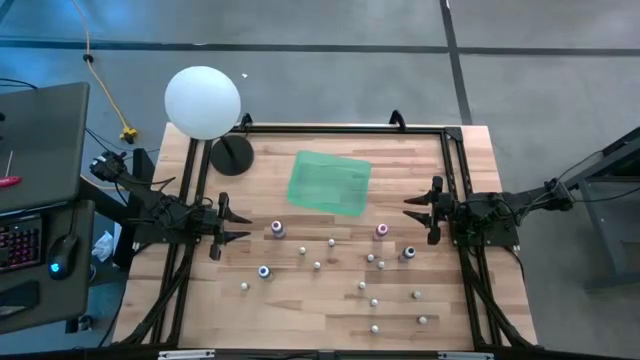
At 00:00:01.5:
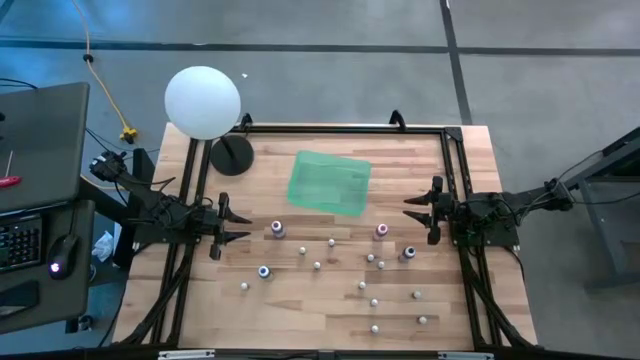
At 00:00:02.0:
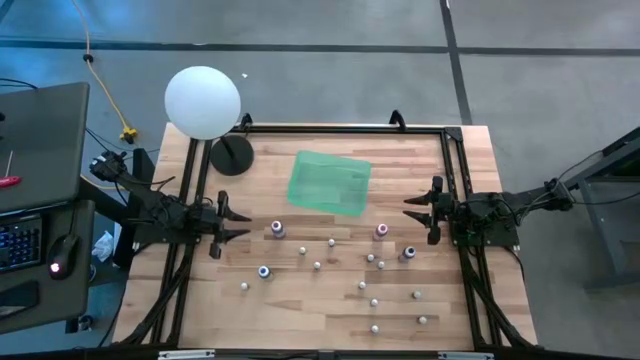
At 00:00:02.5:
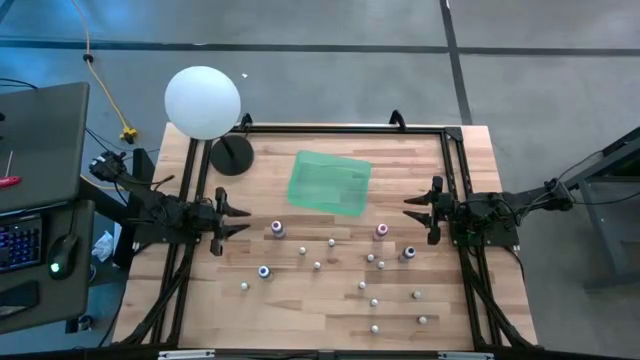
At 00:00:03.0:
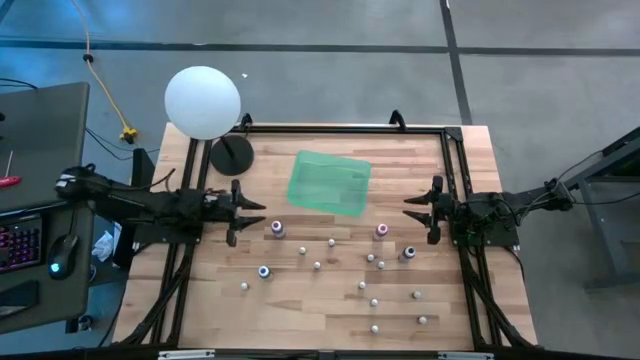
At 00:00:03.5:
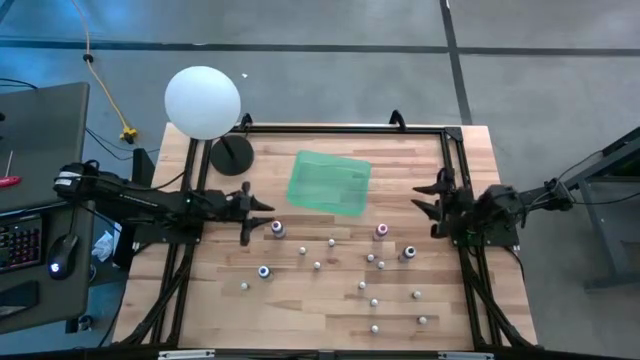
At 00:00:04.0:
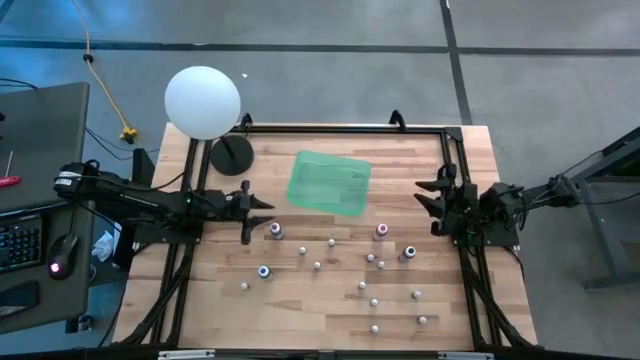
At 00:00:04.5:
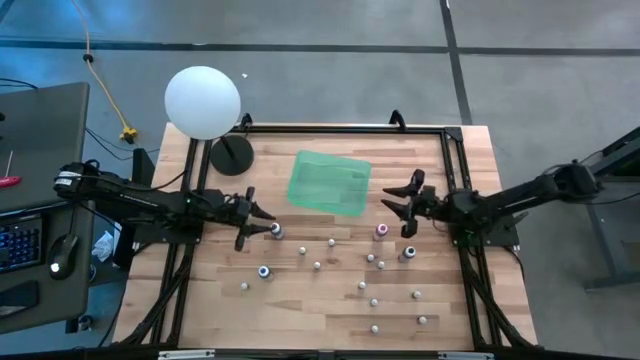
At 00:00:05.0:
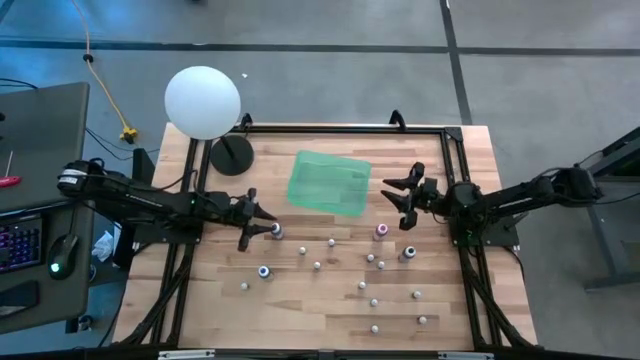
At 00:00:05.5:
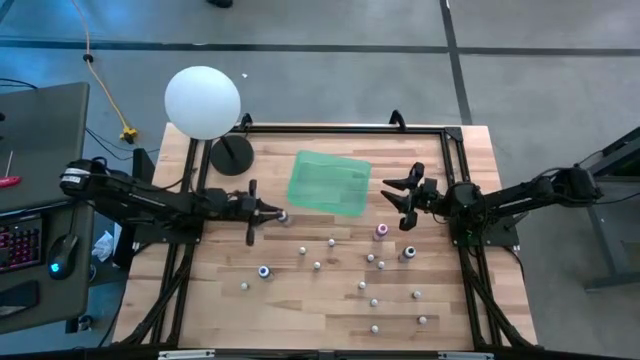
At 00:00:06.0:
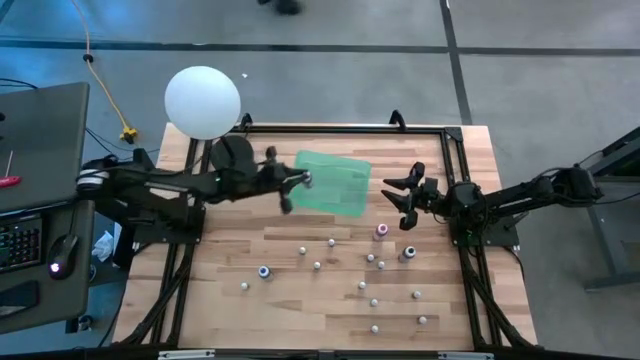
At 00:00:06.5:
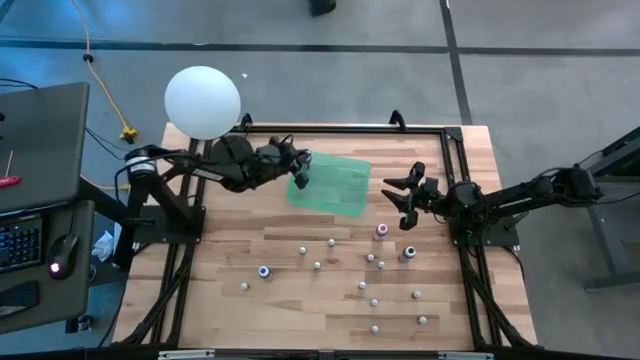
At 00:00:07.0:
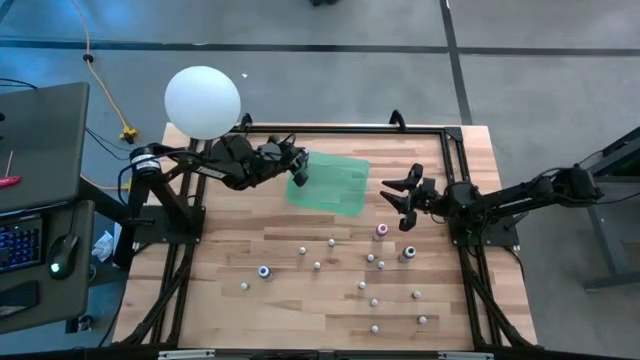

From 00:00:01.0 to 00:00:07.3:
Task: Pick & Place food coloring
Put the purple food coloring bottle into the bin

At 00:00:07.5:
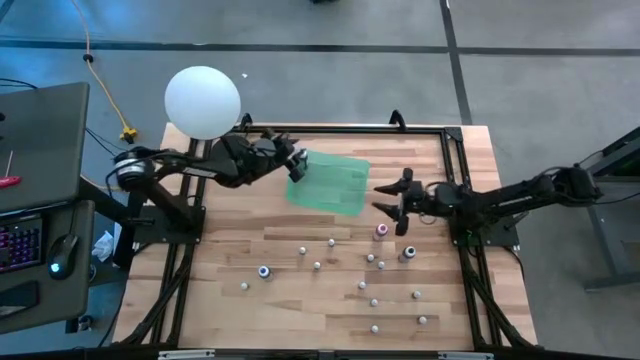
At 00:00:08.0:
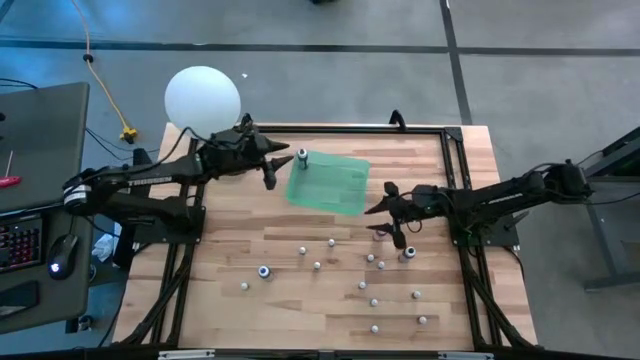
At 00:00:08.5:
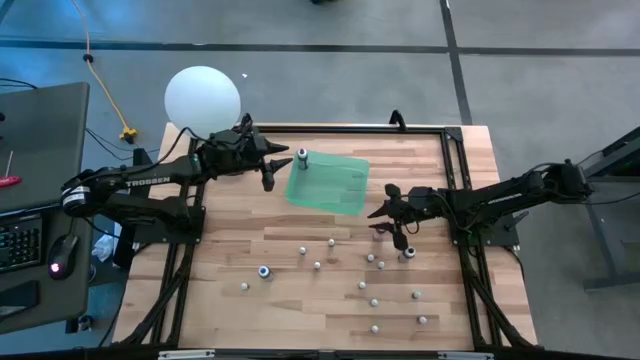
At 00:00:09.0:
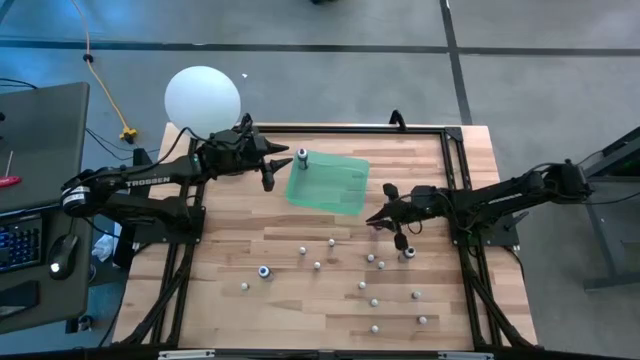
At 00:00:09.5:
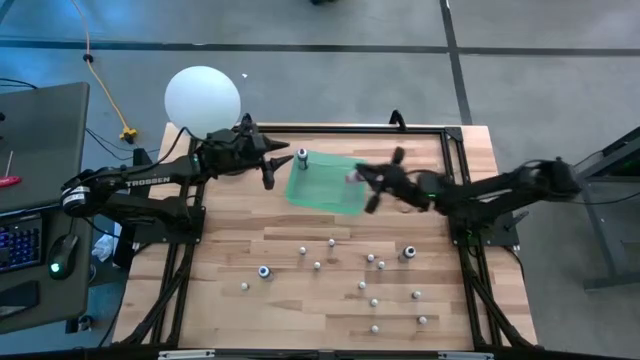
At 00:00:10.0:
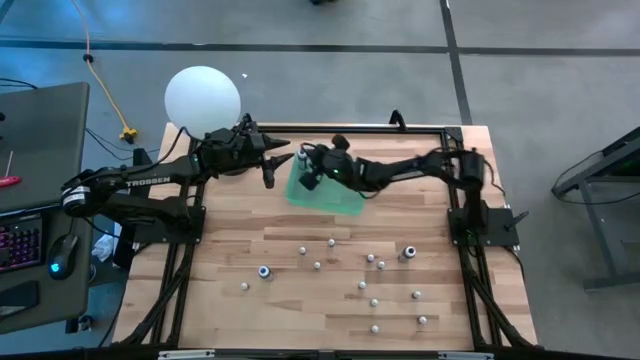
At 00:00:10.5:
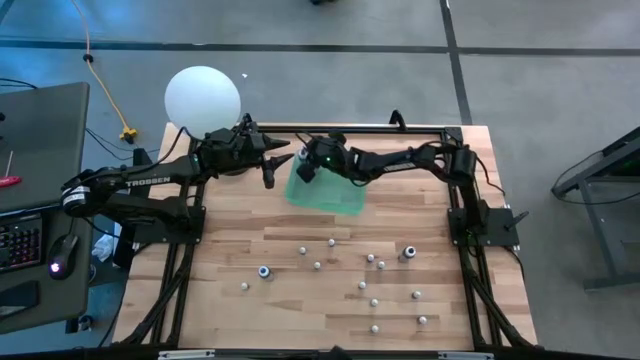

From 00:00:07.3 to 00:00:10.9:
Put the top red food coloring bottle into the bin

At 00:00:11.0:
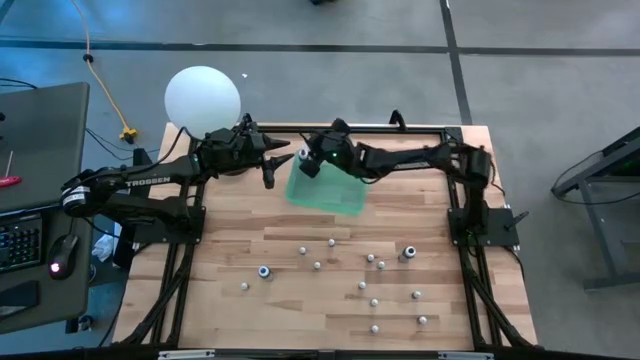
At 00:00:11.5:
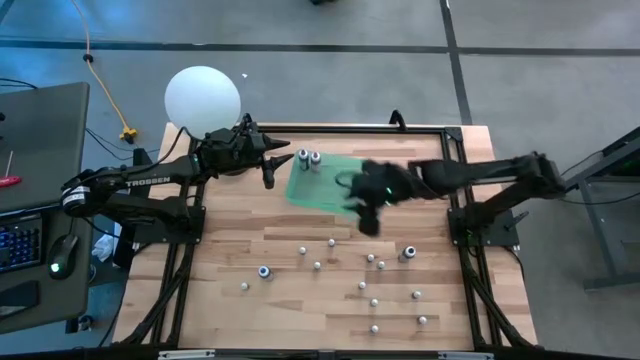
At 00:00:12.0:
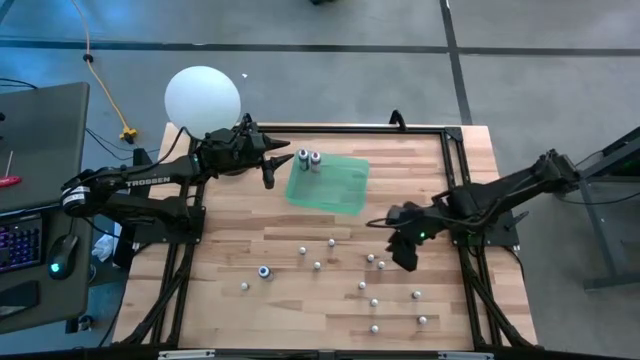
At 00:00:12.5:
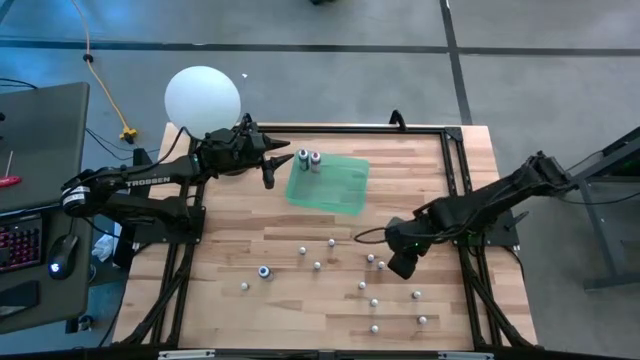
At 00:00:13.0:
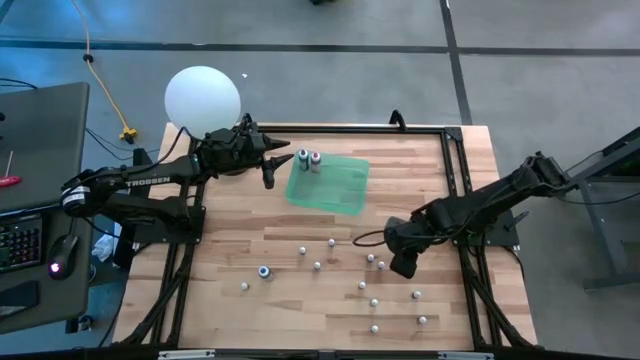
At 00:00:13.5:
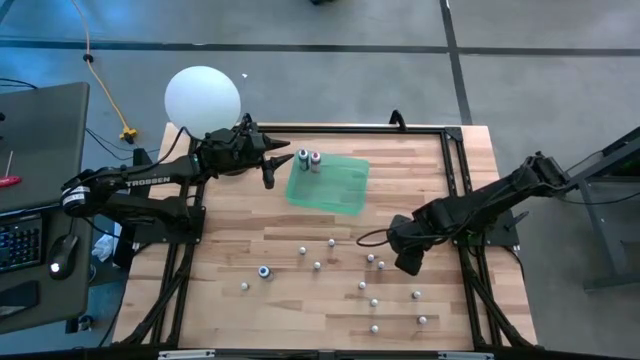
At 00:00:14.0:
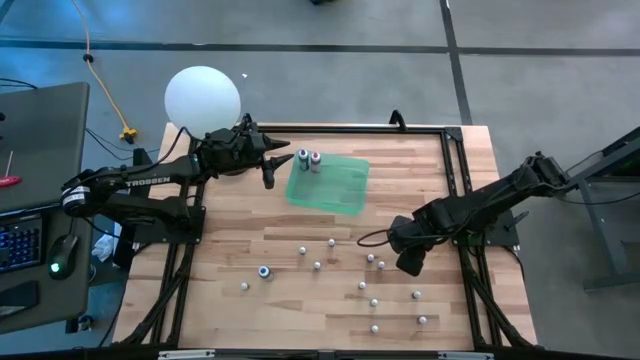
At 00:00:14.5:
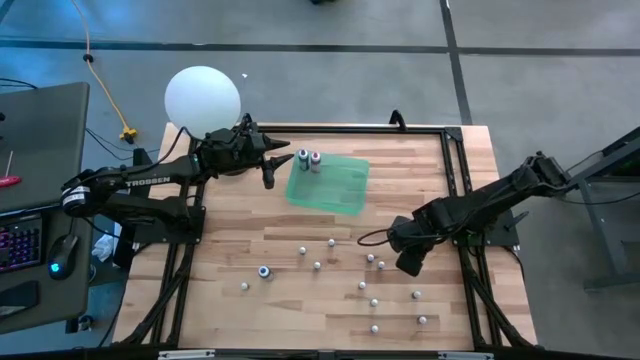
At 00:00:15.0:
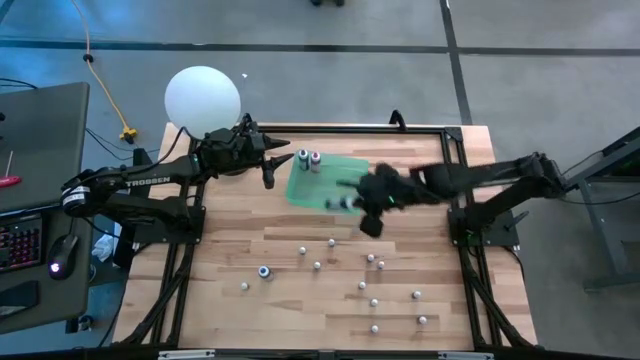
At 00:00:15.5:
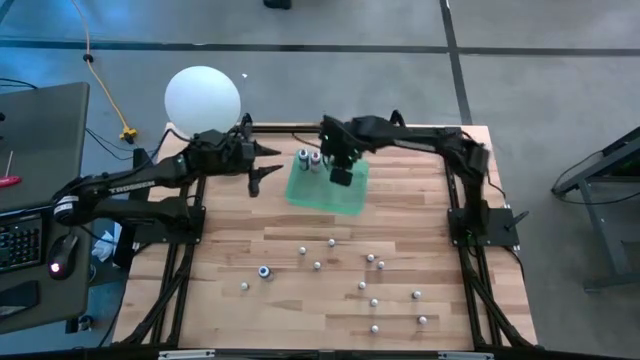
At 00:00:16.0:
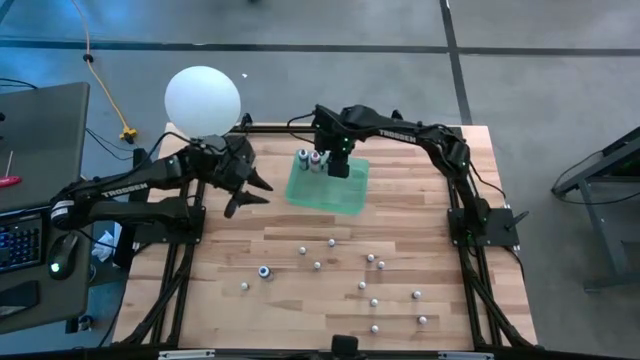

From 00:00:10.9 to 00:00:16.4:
Put the black food coloring bottle into the bin

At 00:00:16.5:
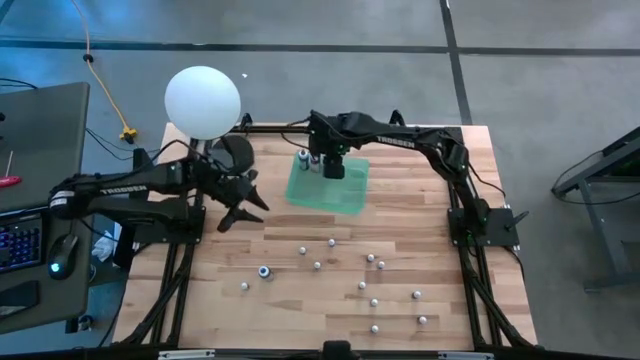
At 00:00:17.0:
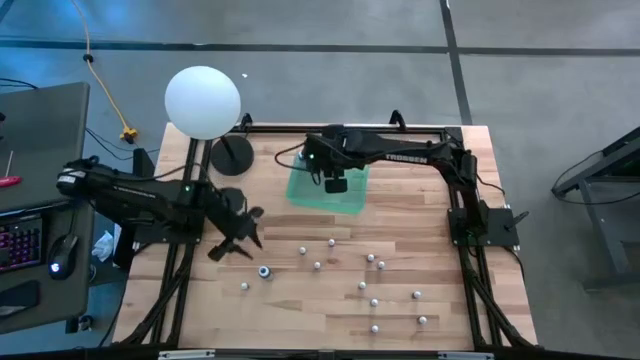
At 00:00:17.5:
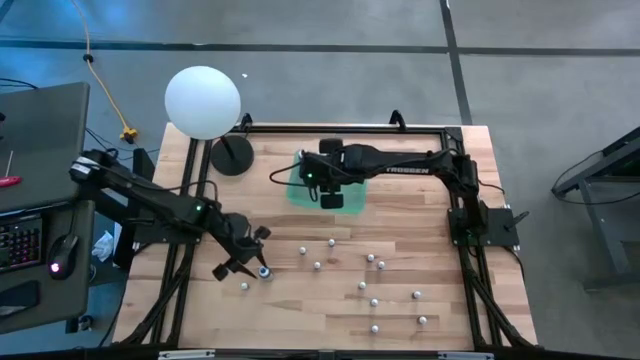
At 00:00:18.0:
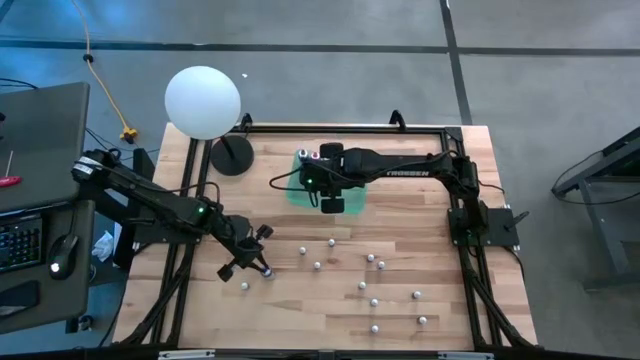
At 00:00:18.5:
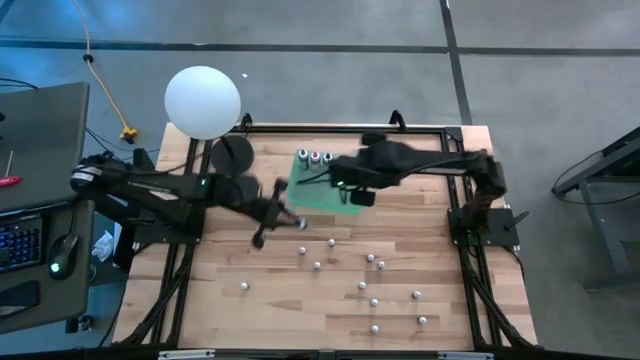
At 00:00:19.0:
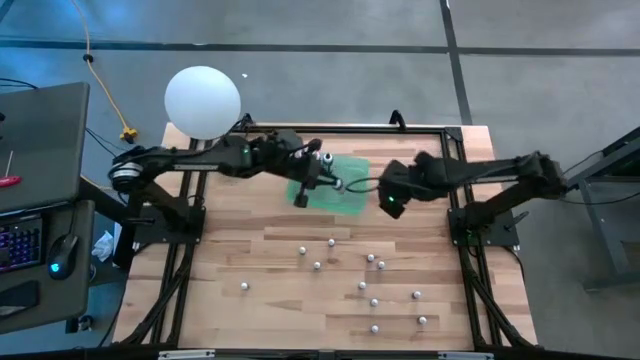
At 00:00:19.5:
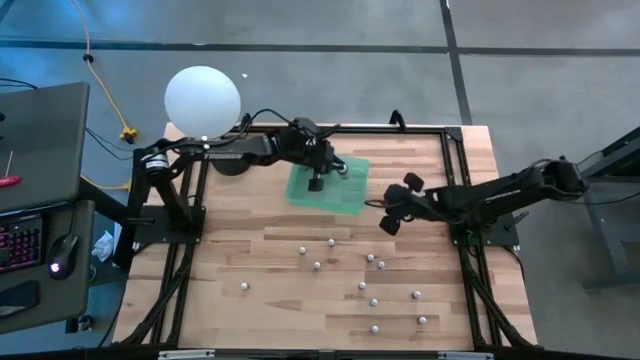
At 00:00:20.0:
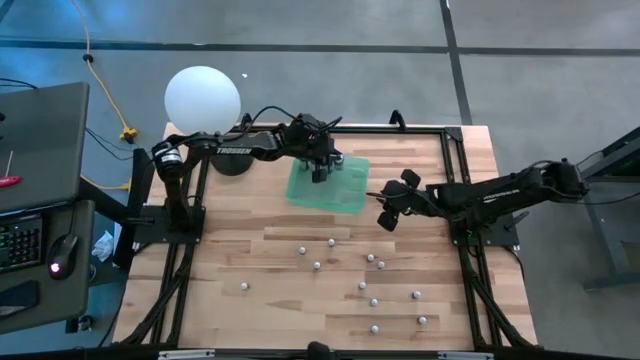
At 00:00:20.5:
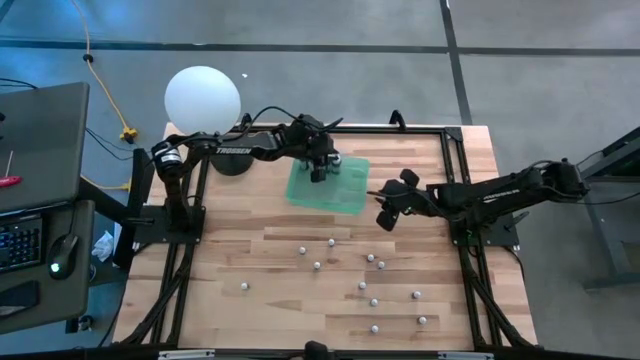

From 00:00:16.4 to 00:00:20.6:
Put the left blue food coloring bottle into the bin

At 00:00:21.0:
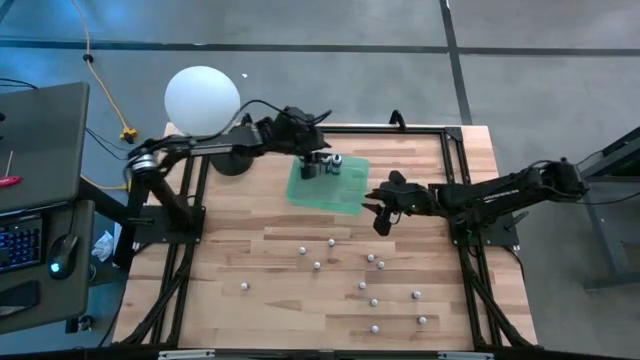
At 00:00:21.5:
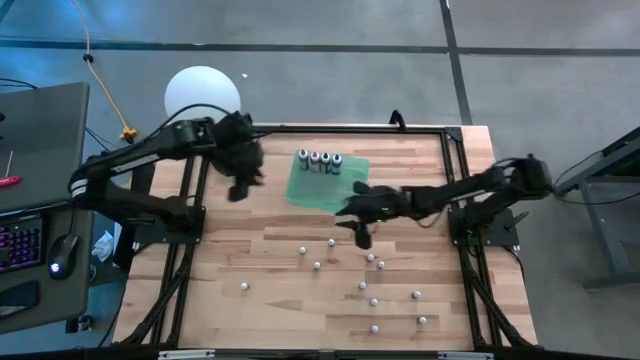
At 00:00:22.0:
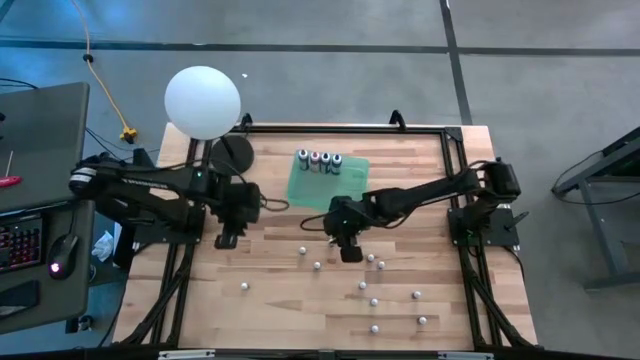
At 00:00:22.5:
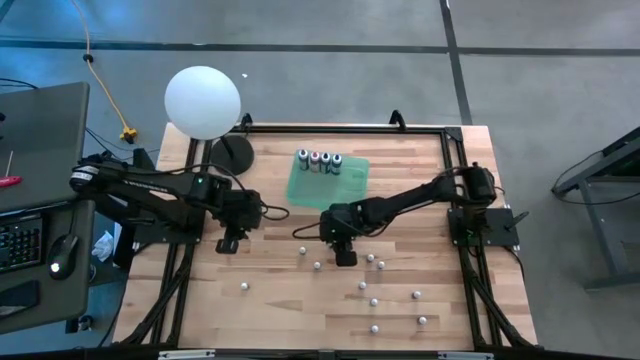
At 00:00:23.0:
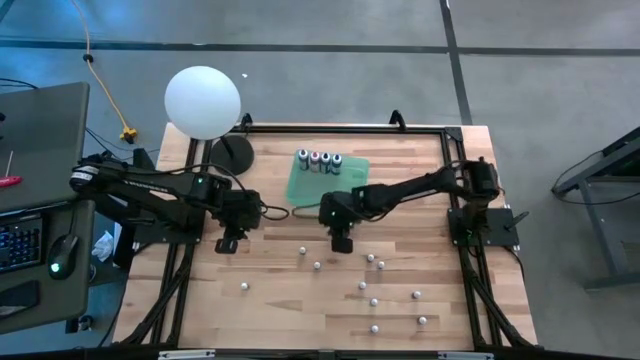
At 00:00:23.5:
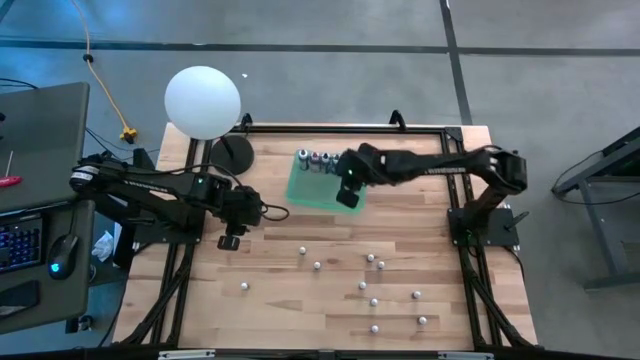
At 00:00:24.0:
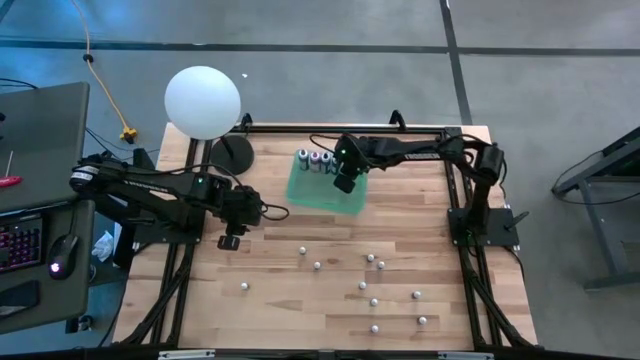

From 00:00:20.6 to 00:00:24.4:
Put the pink food coloring bottle into the bin
